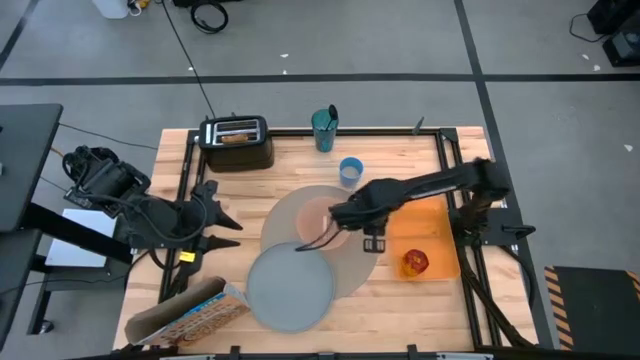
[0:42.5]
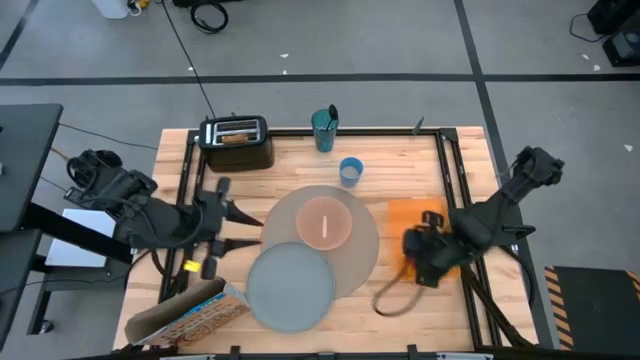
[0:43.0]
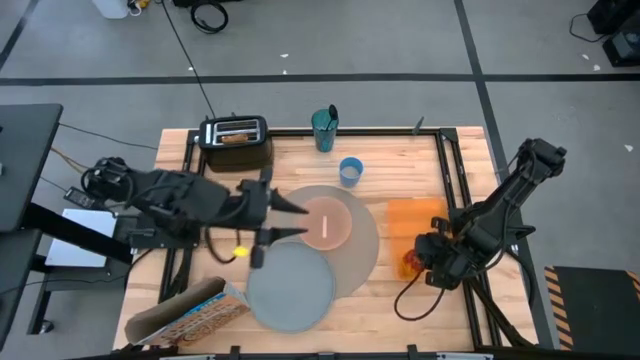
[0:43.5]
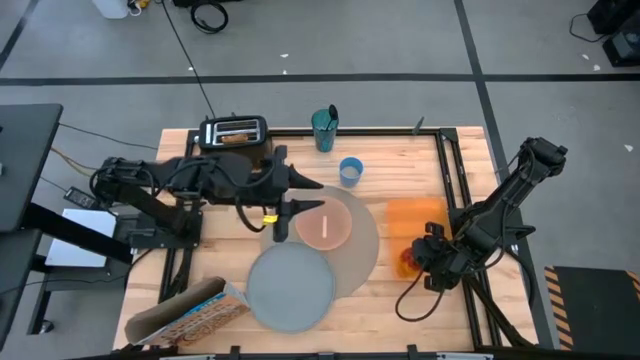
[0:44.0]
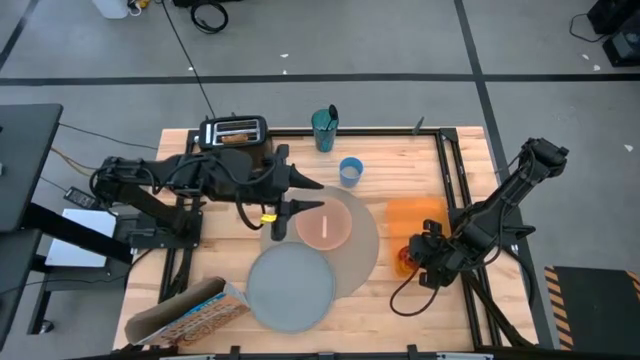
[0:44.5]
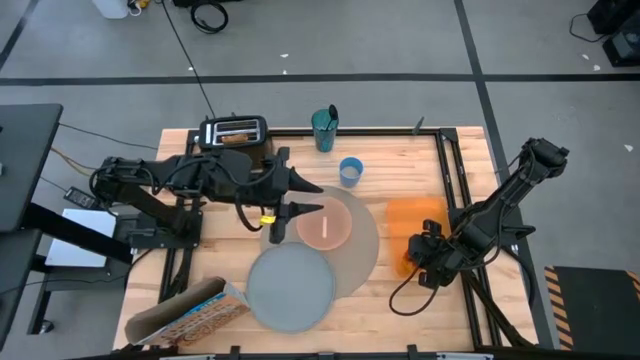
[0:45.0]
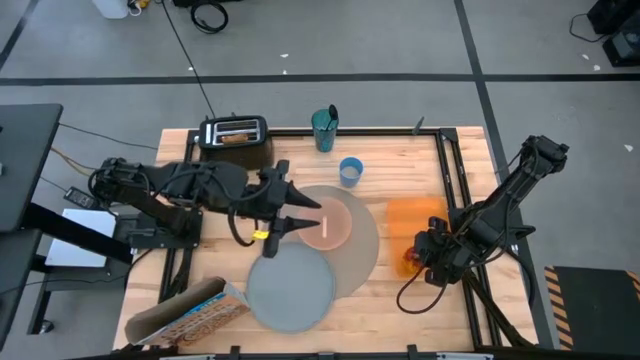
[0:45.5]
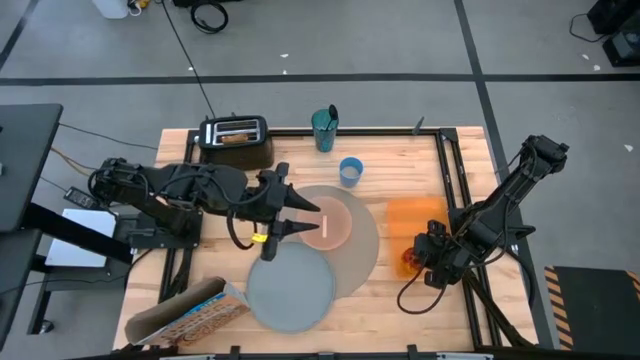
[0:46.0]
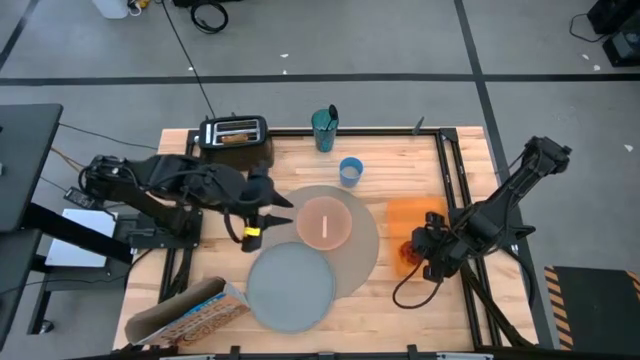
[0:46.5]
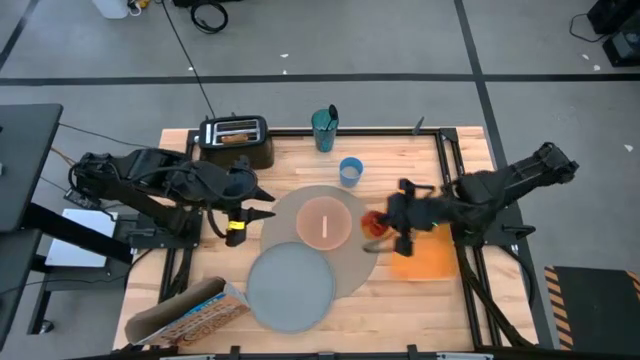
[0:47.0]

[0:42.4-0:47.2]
Task: Arrange a breakfast setting
Put the apple on the brown table mat to the top left of the light orange bowl

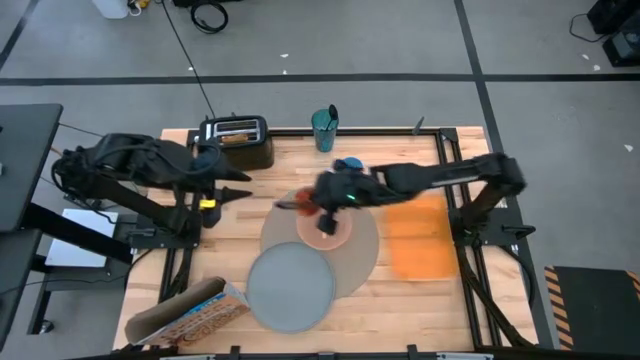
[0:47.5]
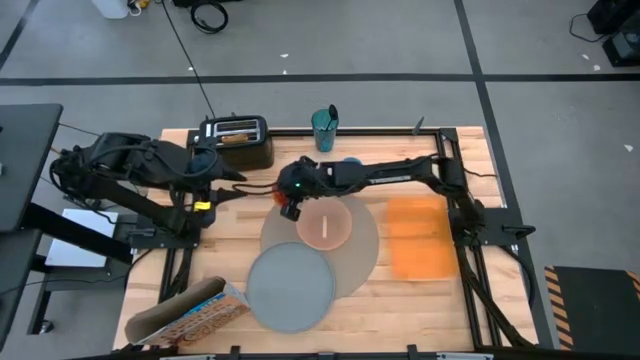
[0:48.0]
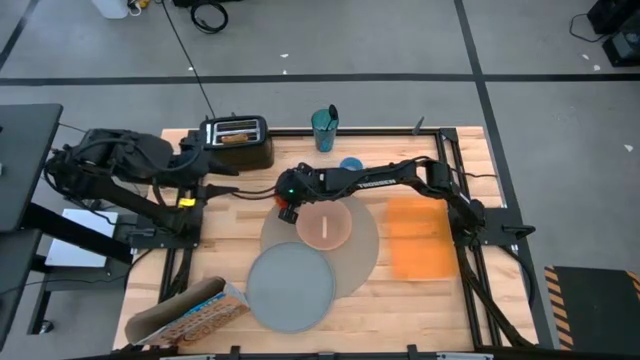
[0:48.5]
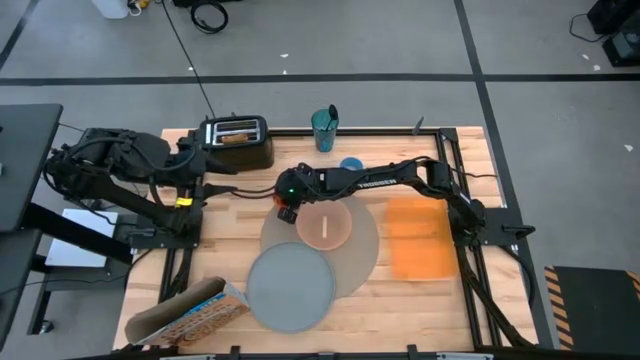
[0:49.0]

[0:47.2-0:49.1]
Put the apple on the brown table mat to the top left of the light orange bowl

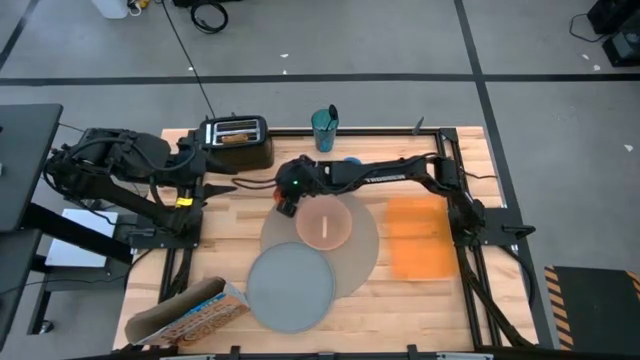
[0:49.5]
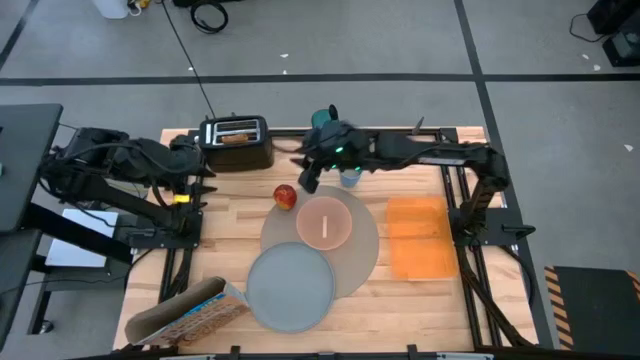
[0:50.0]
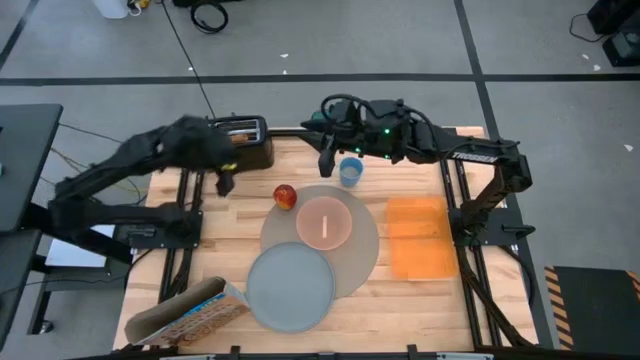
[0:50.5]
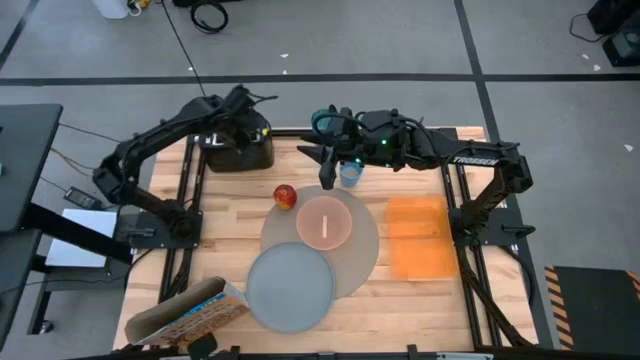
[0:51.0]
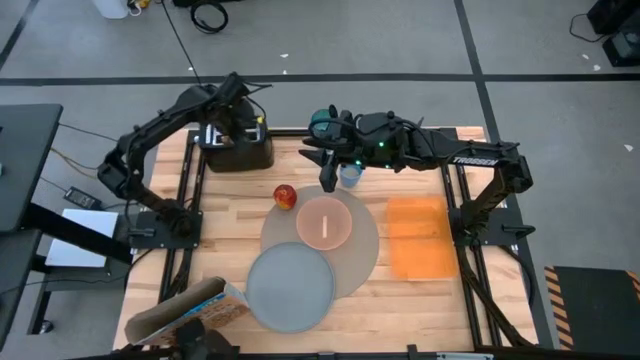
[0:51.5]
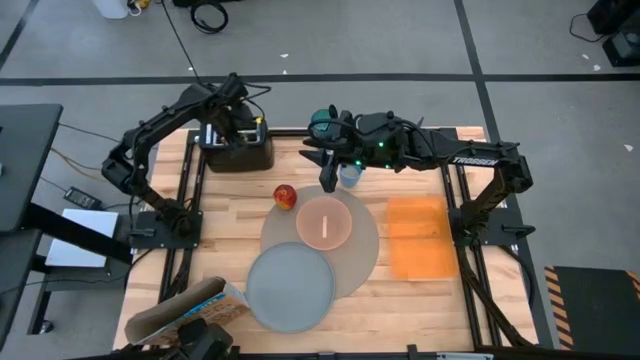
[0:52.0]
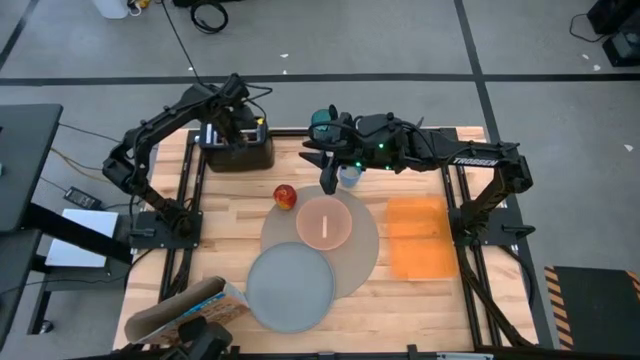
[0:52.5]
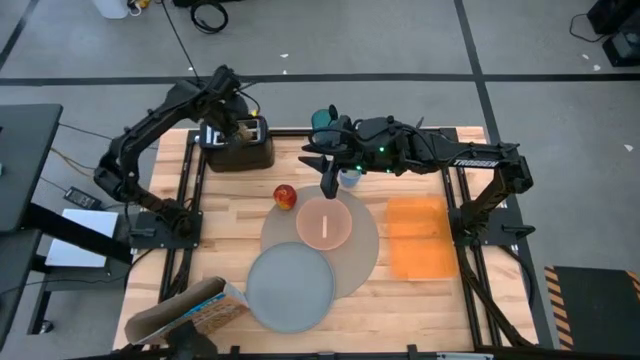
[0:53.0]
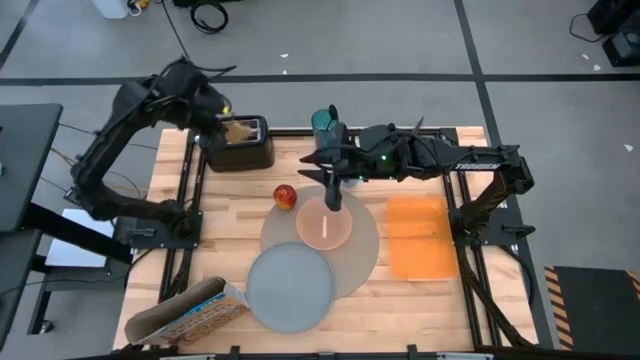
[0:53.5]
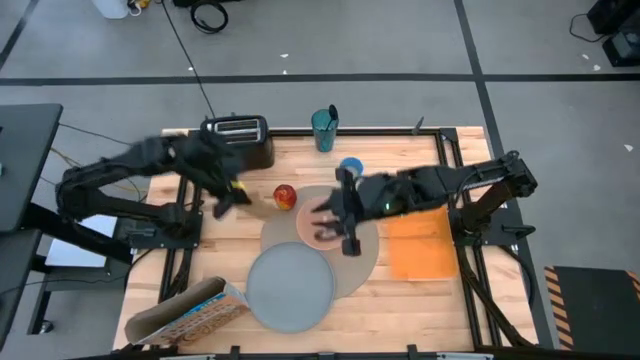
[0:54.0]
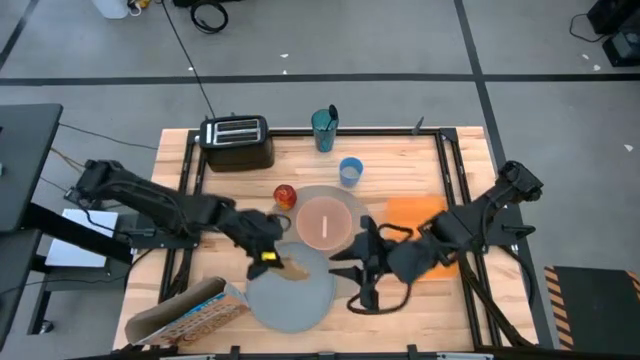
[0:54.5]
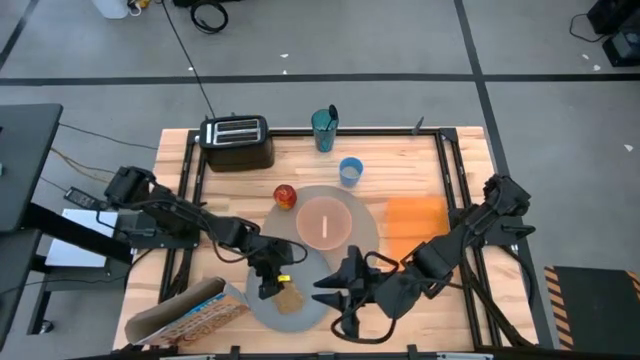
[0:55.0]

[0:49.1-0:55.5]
Put the toasted bread on the light blue plate

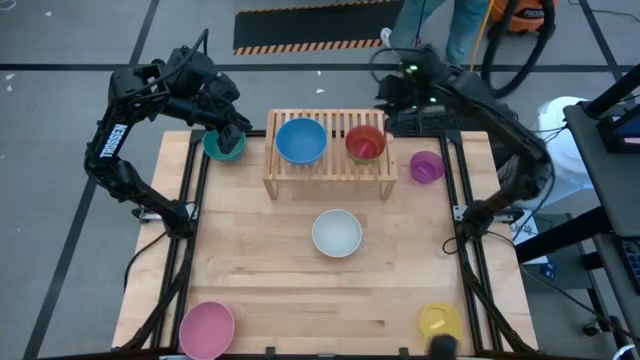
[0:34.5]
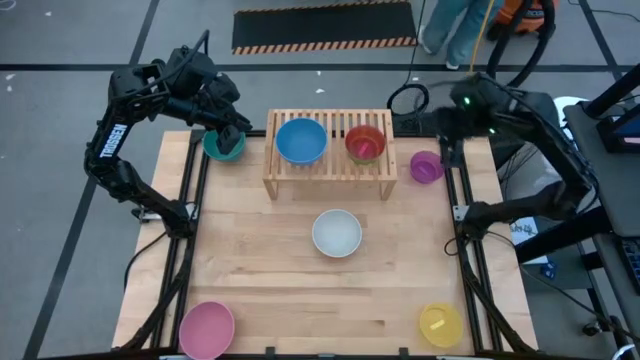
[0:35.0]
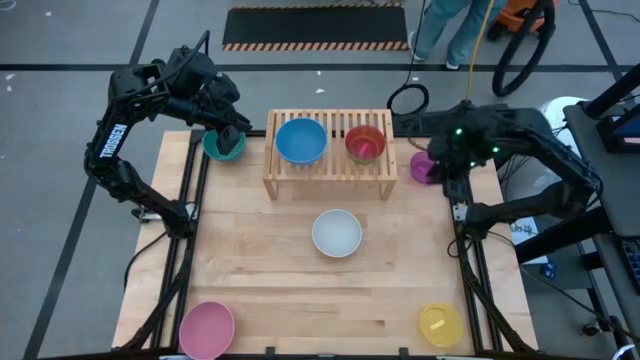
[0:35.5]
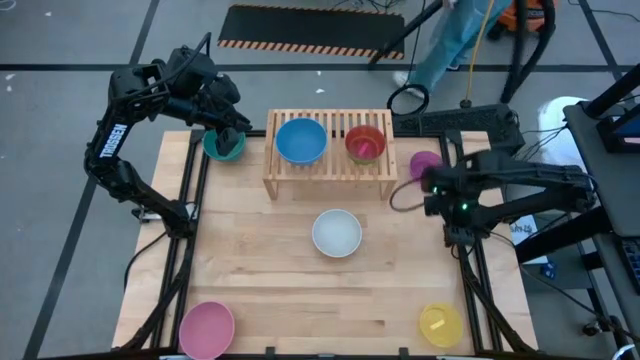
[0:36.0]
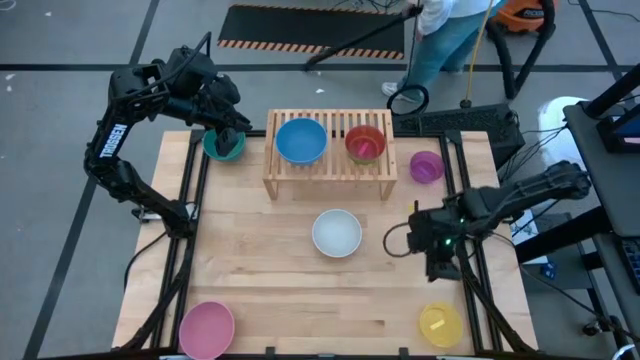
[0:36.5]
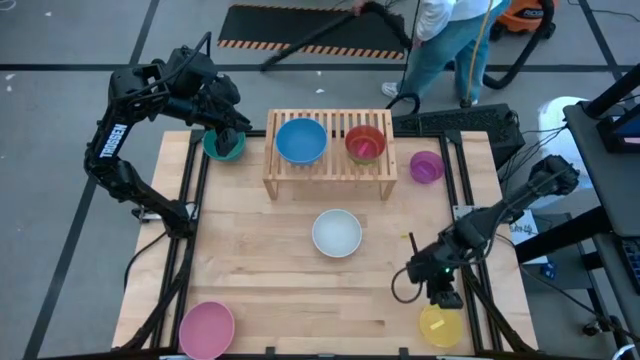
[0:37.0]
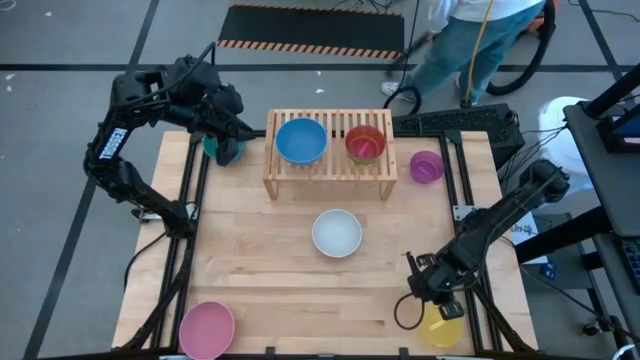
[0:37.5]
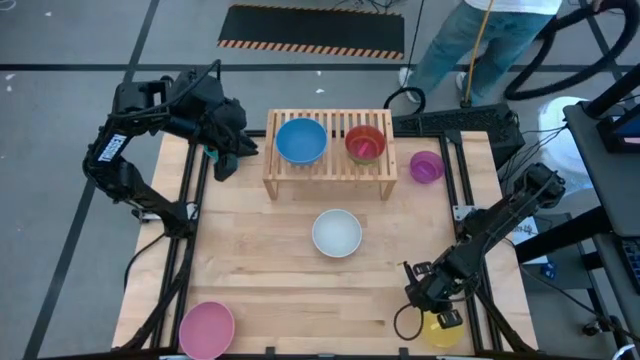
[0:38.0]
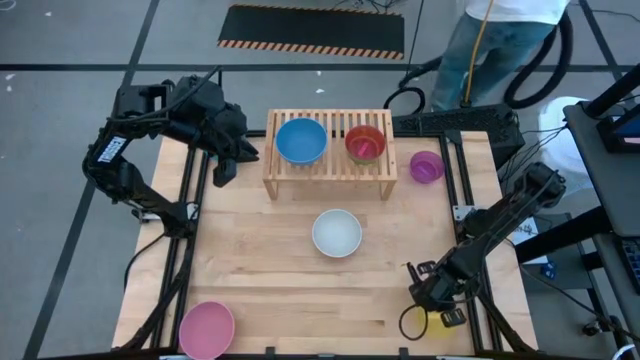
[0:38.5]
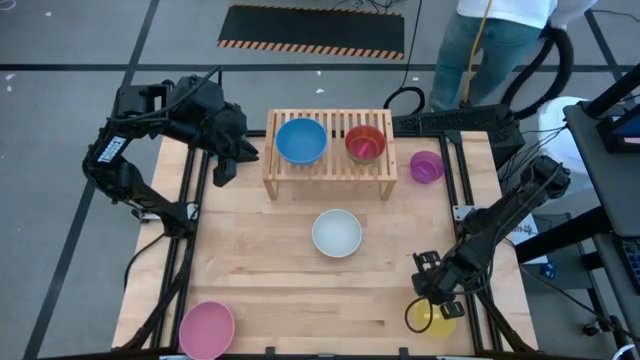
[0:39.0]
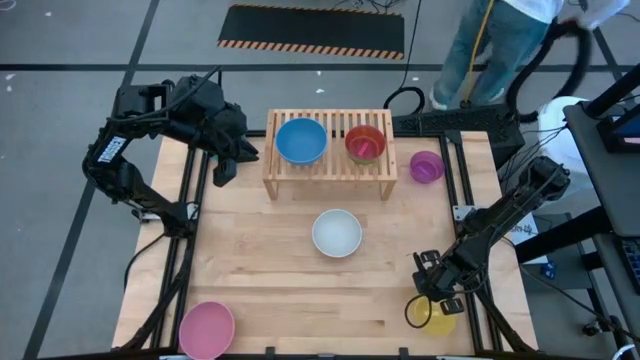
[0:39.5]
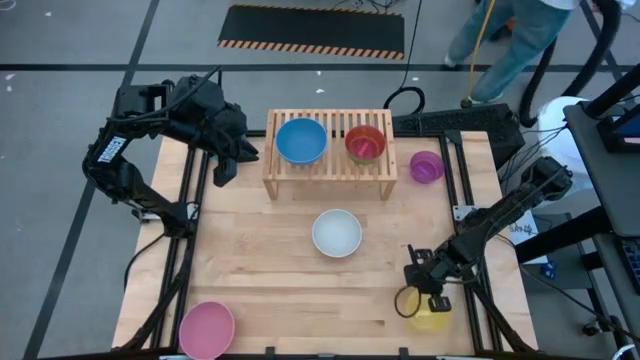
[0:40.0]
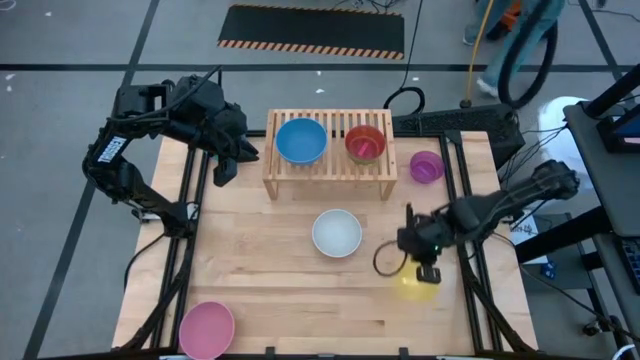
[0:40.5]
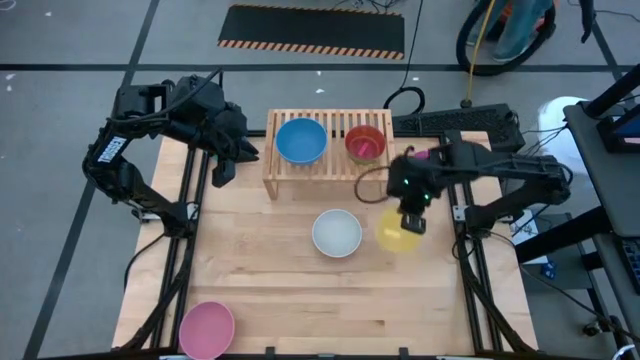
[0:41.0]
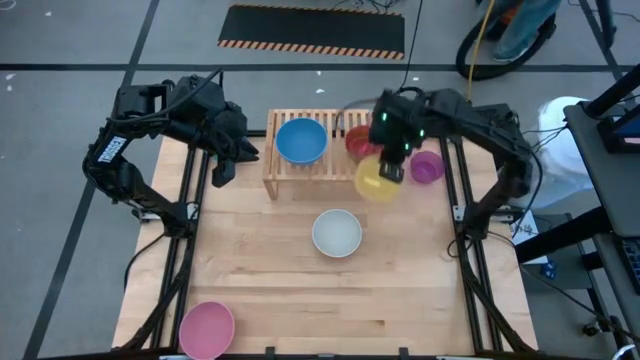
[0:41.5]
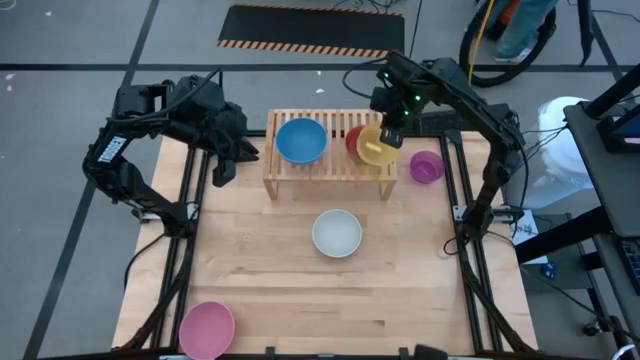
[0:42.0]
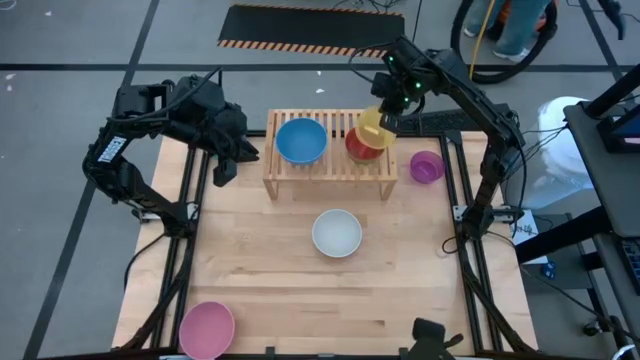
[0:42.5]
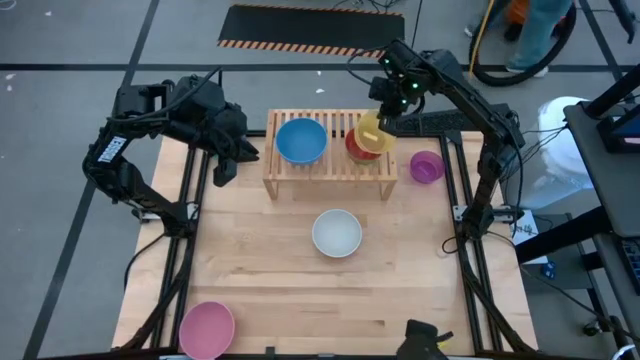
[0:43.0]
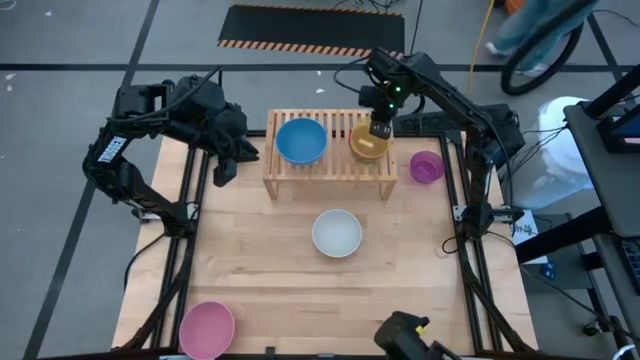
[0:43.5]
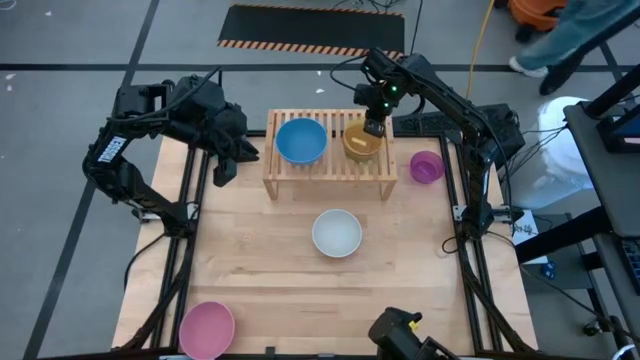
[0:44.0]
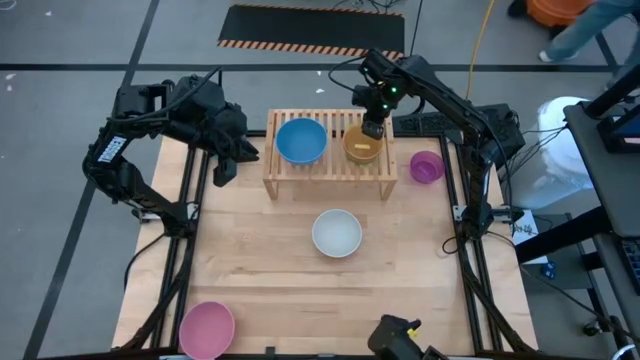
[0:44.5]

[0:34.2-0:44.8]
Task: Place and stack bowls onto a shelf
Stack the yellow bowl on top of the red bowl on the shelf
